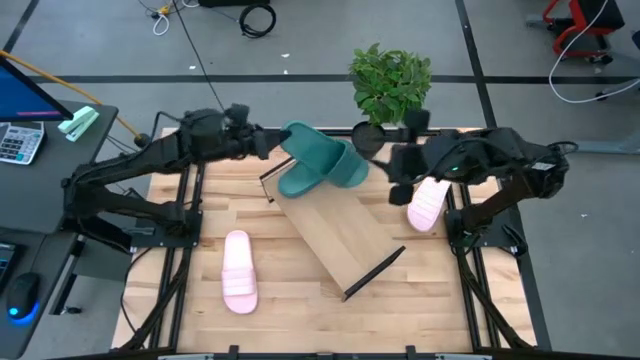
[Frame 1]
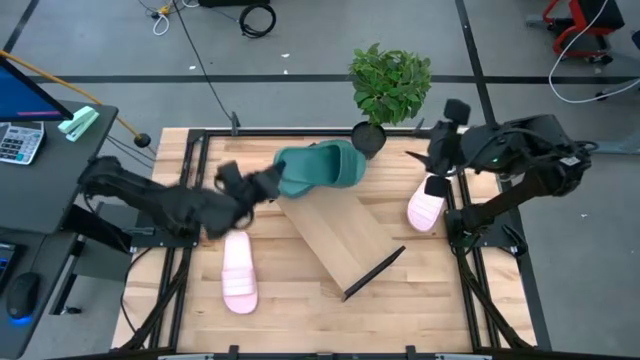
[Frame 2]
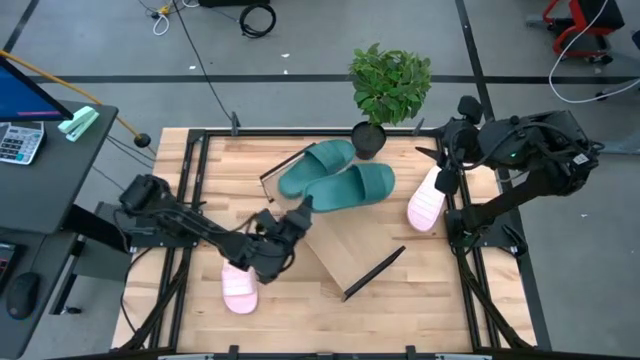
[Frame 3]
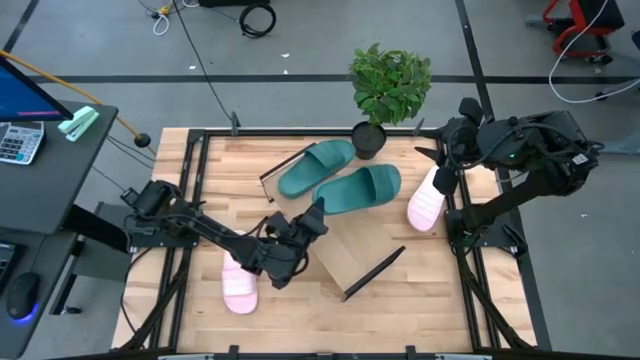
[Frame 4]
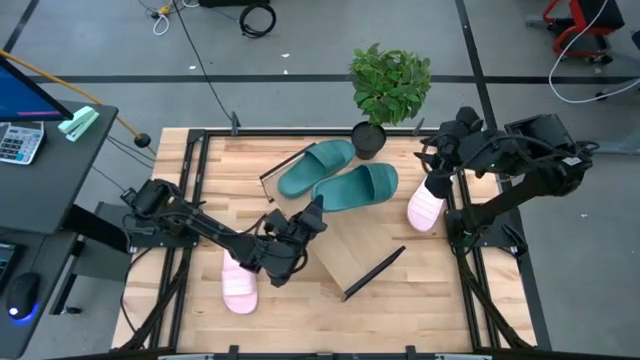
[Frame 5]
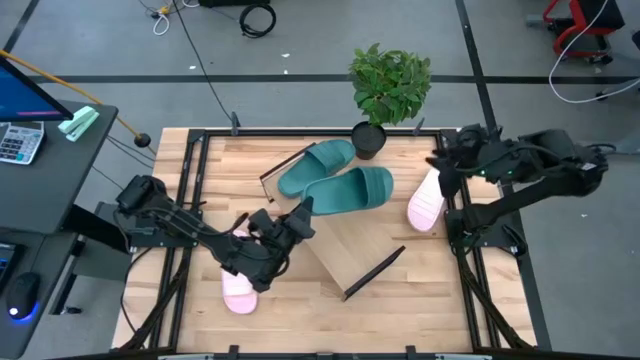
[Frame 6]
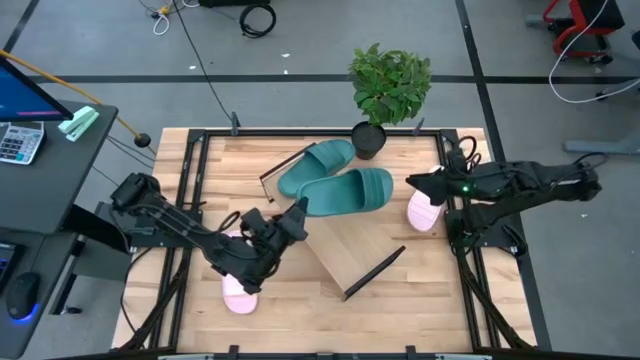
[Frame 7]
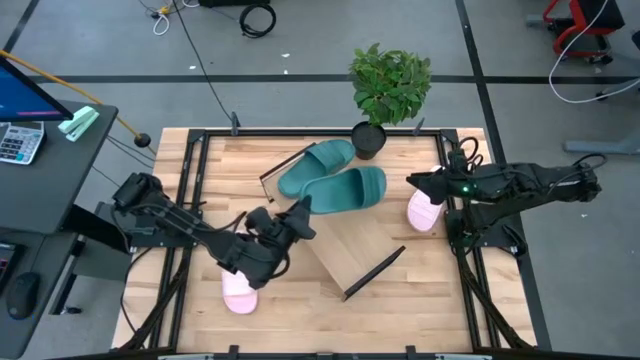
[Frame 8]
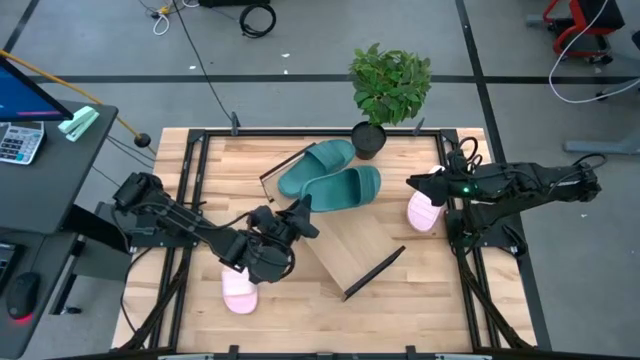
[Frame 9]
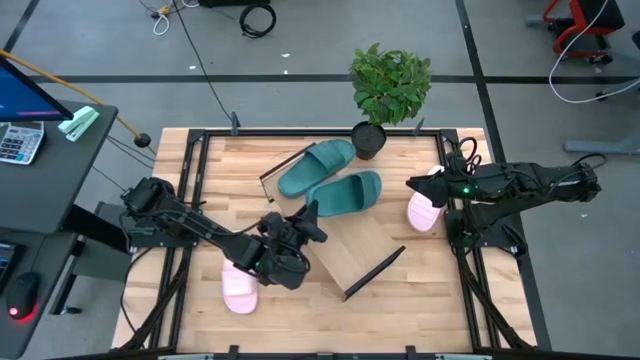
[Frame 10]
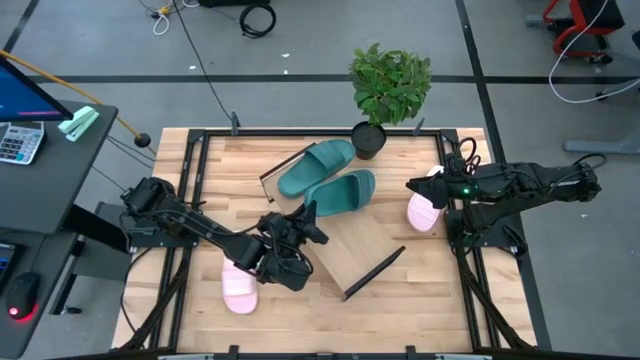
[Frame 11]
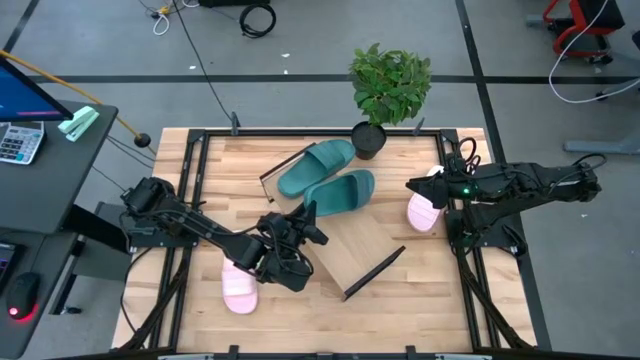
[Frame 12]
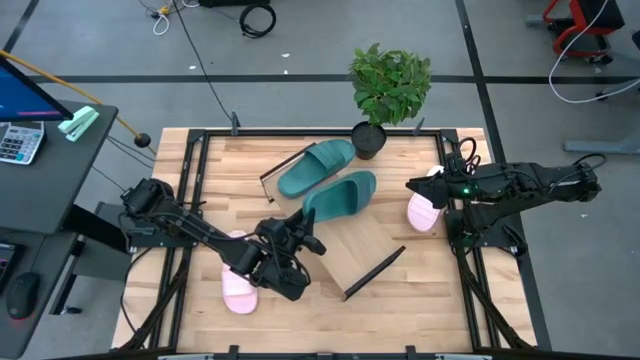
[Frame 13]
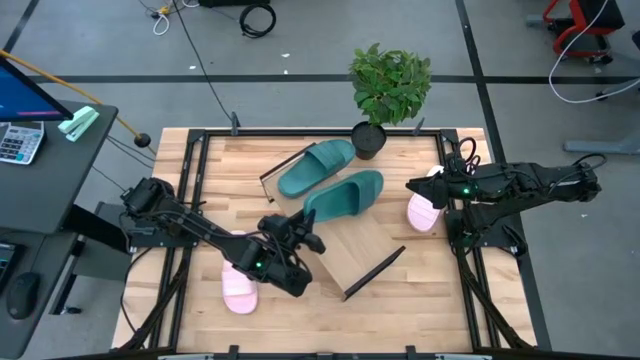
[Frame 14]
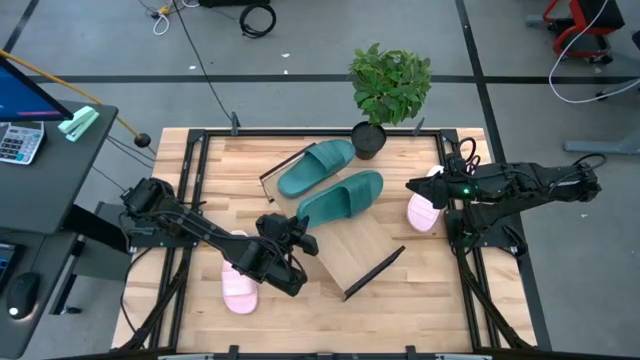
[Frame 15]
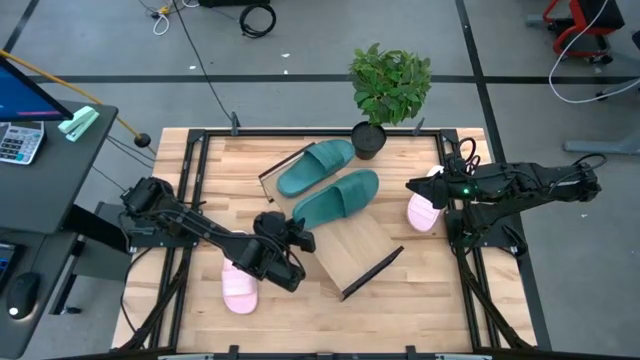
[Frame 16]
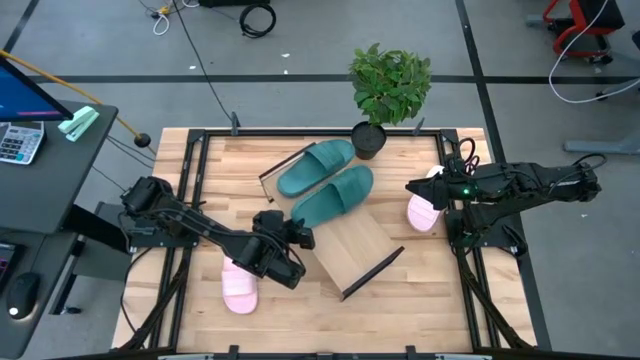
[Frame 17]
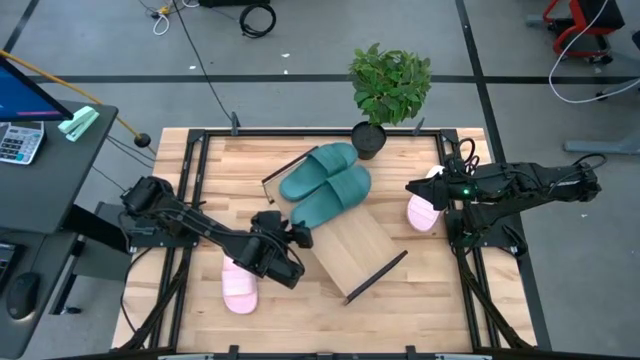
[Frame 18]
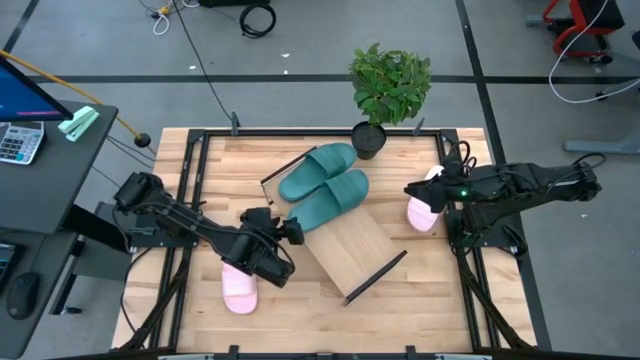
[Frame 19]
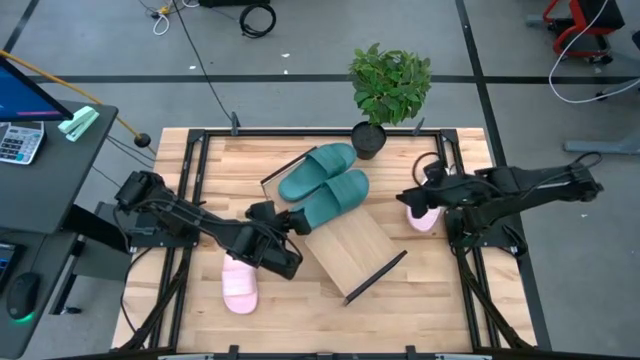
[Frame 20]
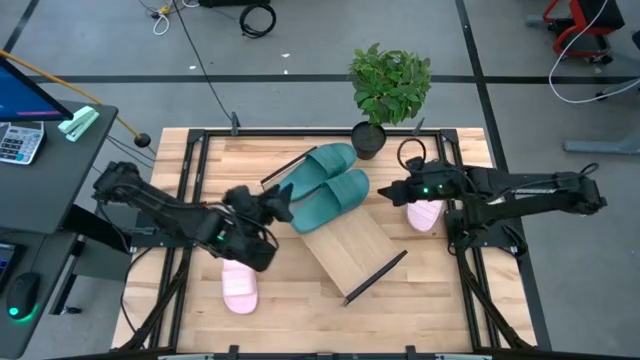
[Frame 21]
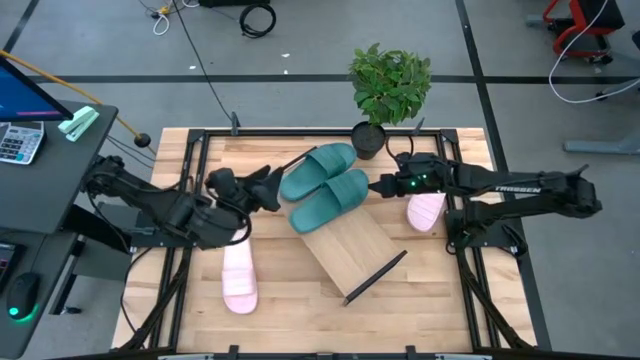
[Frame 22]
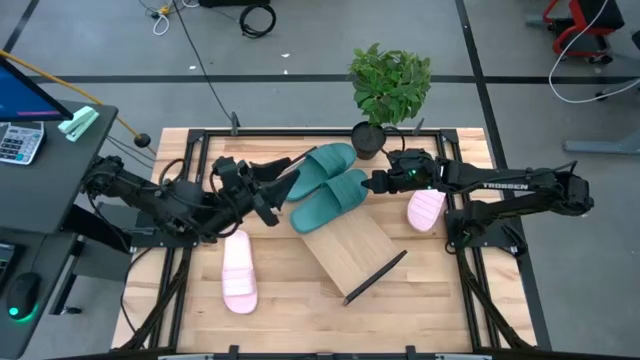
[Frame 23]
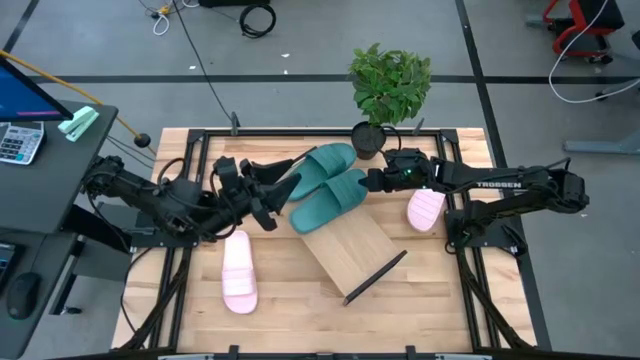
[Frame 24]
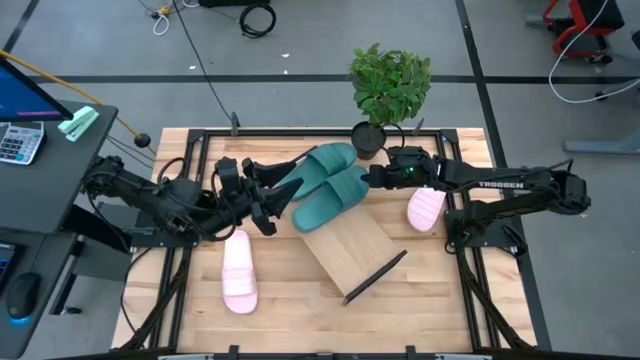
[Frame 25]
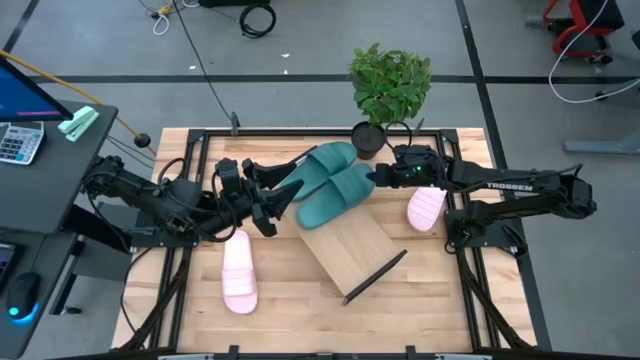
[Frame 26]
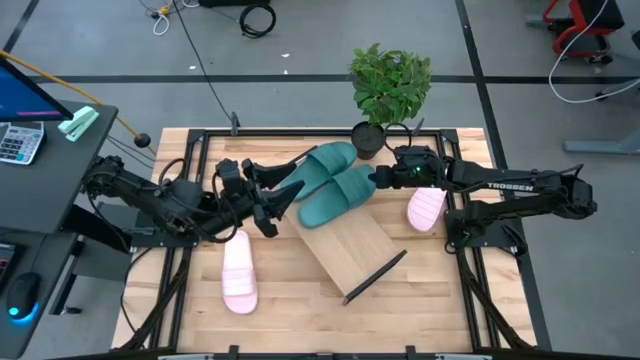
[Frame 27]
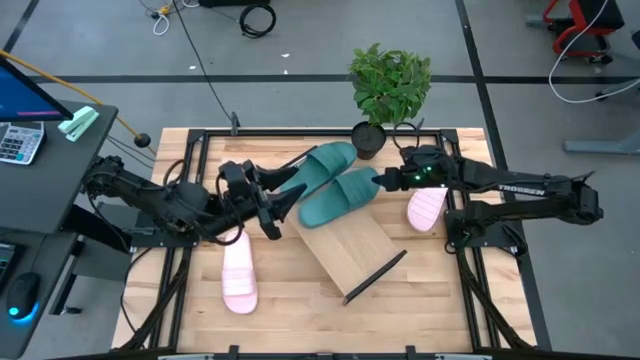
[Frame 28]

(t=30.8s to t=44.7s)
Task: Pick and place slides into the shelf
Put the green slide on the shelf

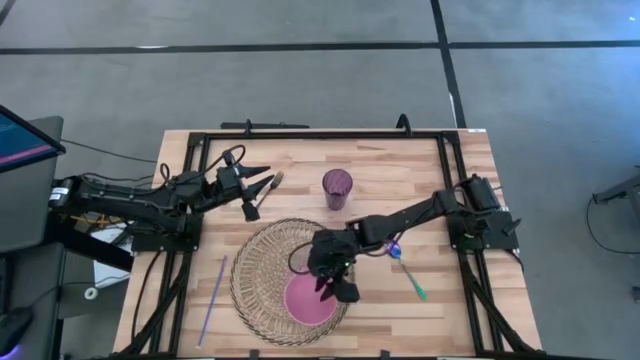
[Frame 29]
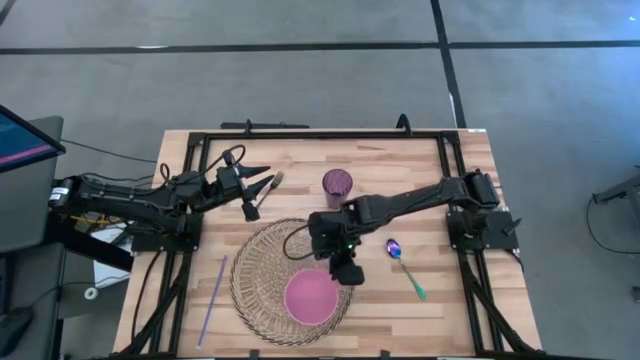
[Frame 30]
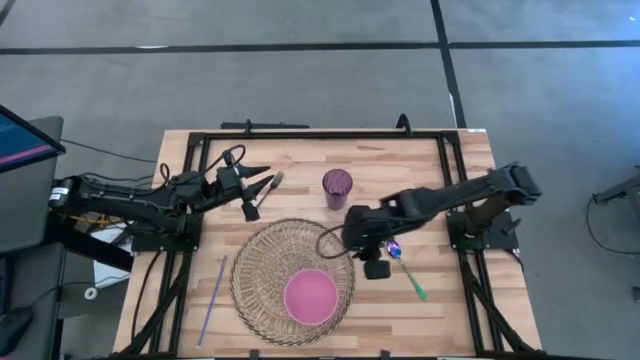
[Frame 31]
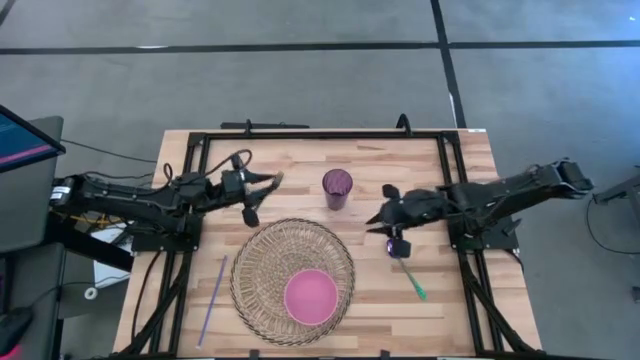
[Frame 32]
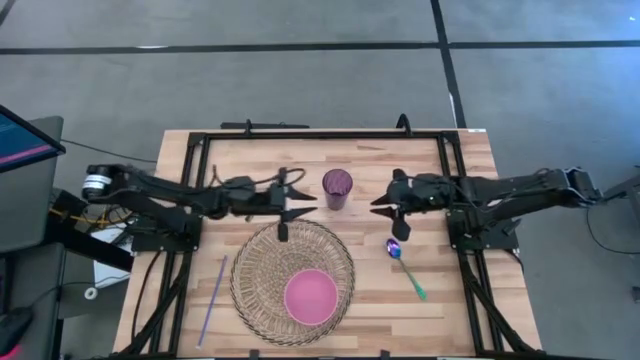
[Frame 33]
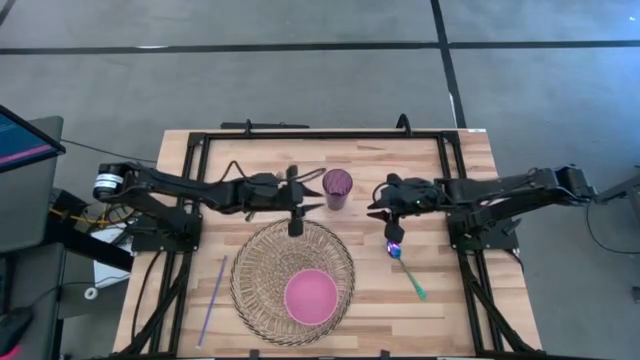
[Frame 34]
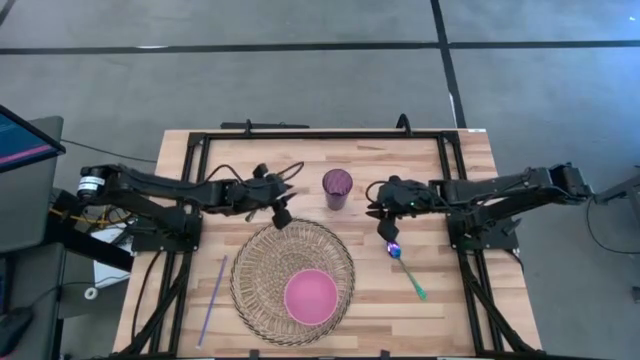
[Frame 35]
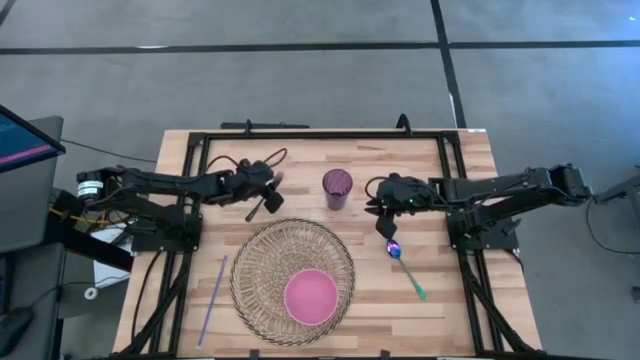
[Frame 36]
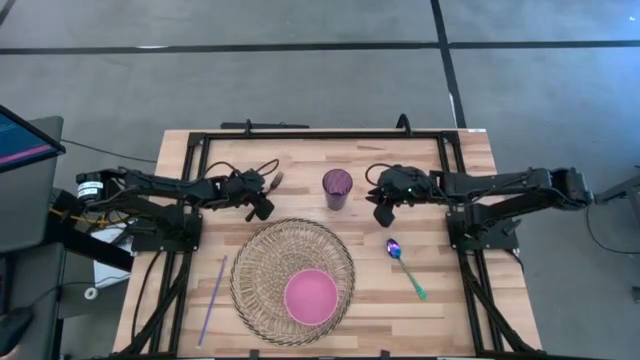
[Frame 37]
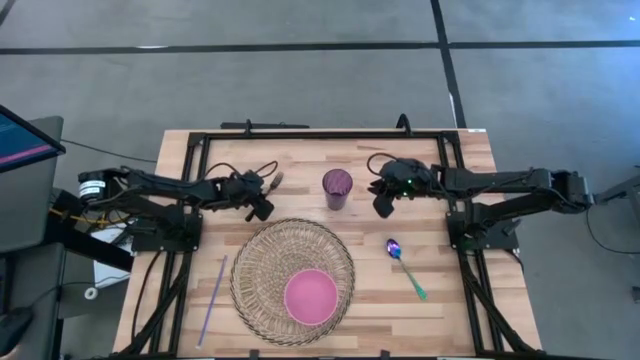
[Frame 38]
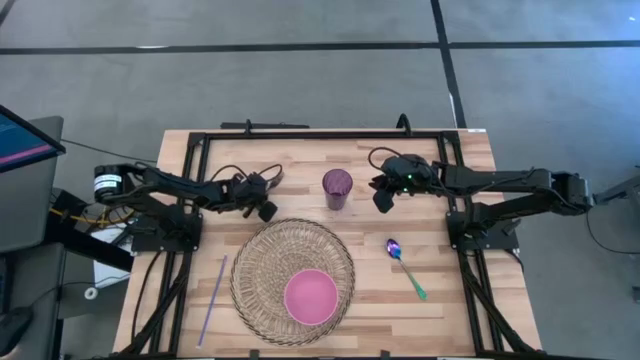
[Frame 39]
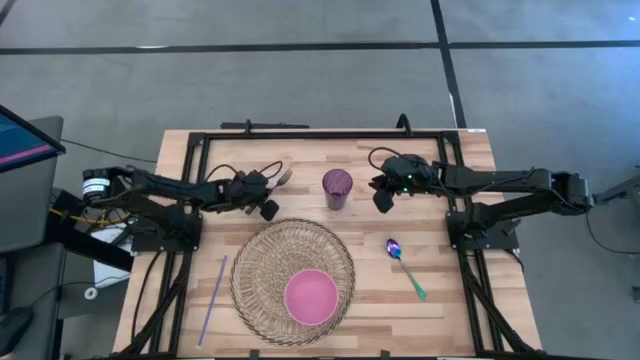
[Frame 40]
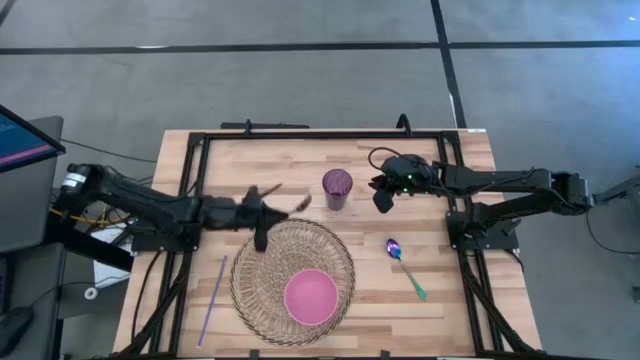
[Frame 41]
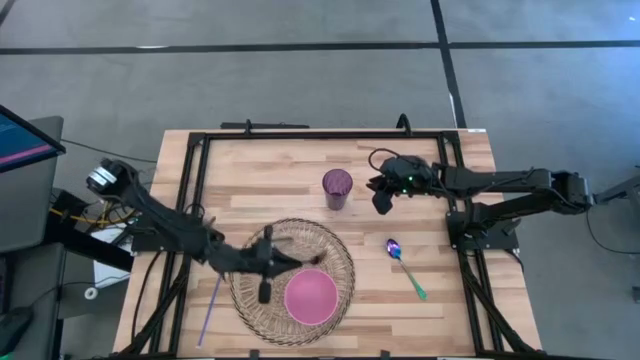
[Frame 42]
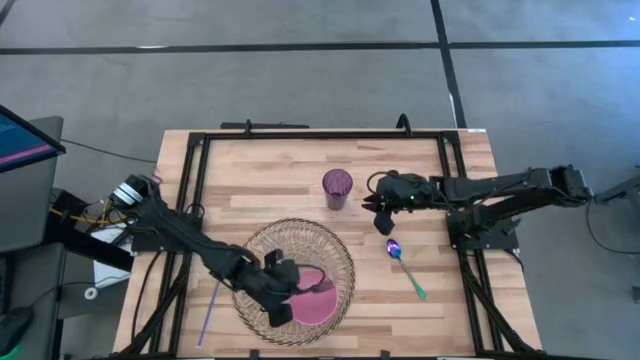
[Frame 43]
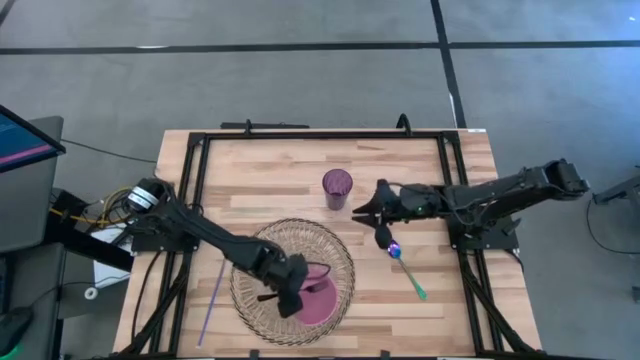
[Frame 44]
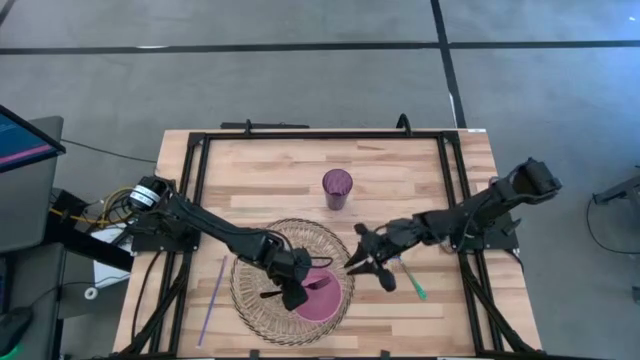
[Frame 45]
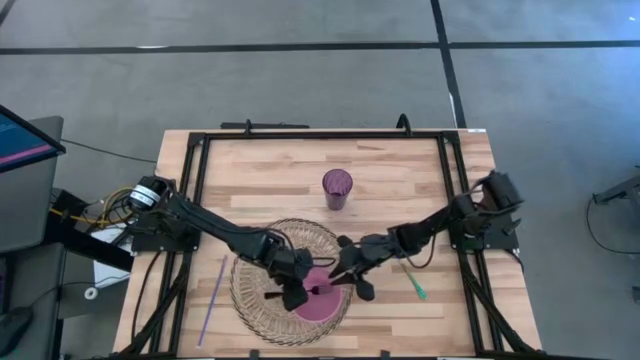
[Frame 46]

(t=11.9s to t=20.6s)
Task: Pick & Place Utensil
Put the black fork into the pink bowl
